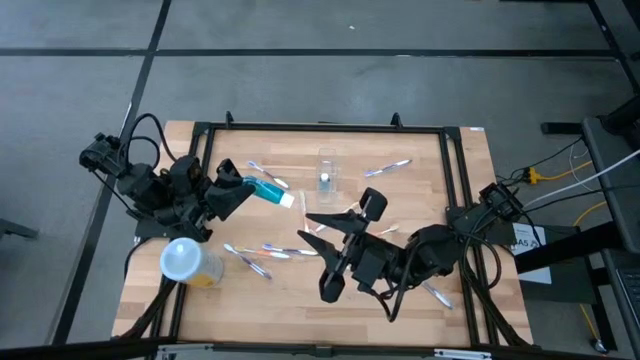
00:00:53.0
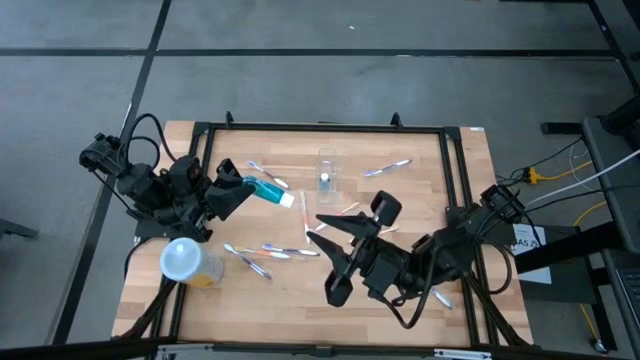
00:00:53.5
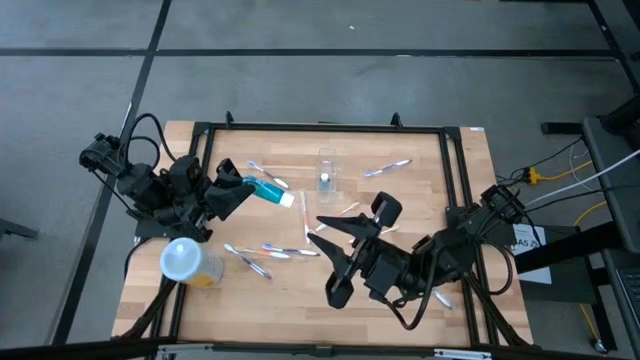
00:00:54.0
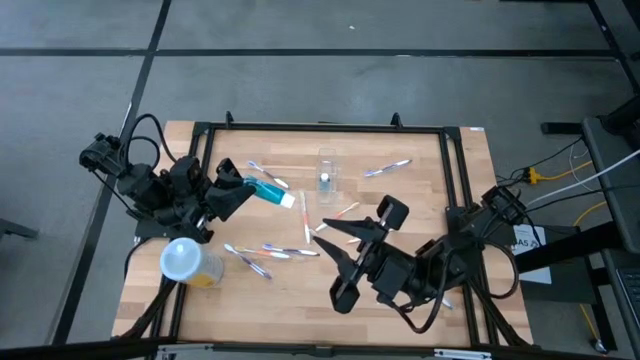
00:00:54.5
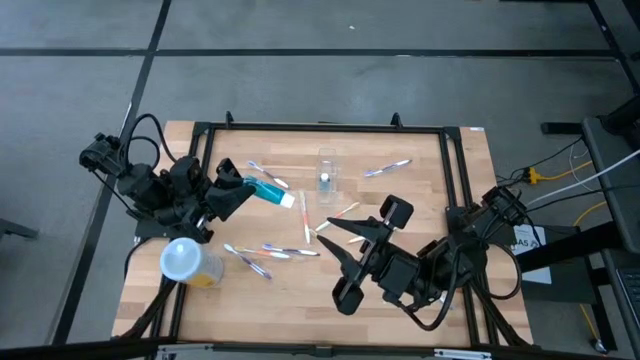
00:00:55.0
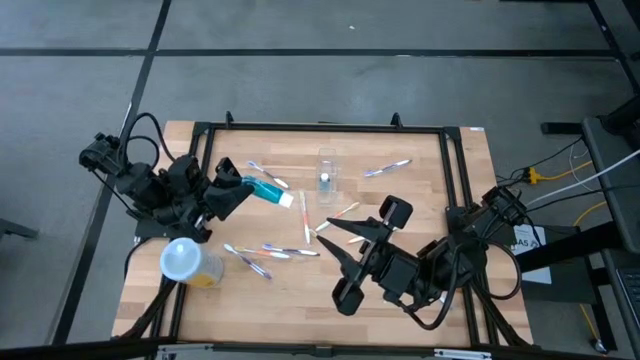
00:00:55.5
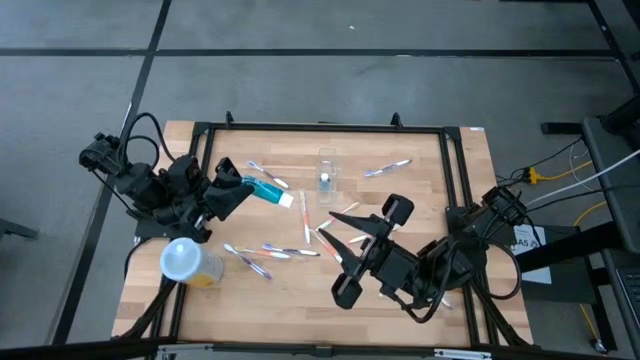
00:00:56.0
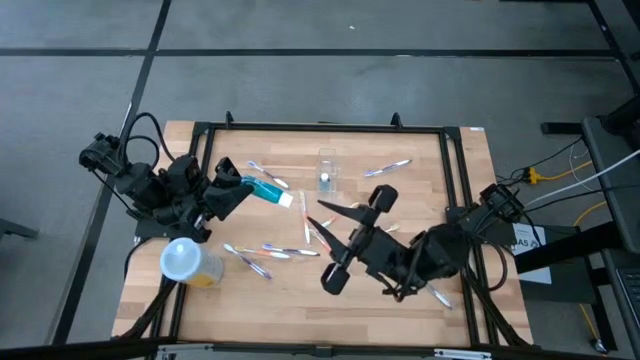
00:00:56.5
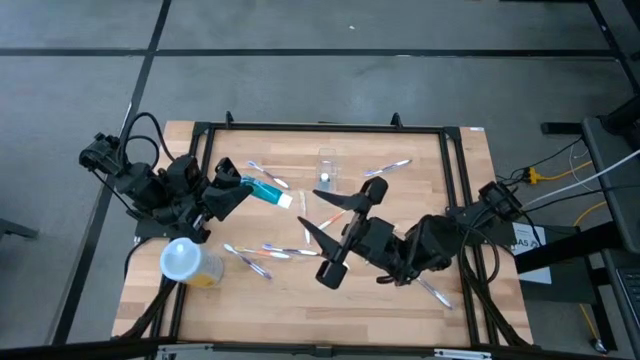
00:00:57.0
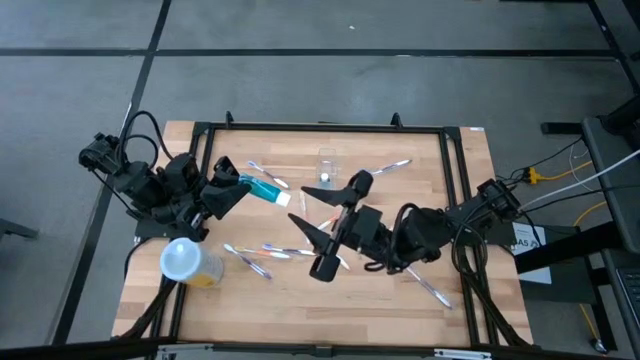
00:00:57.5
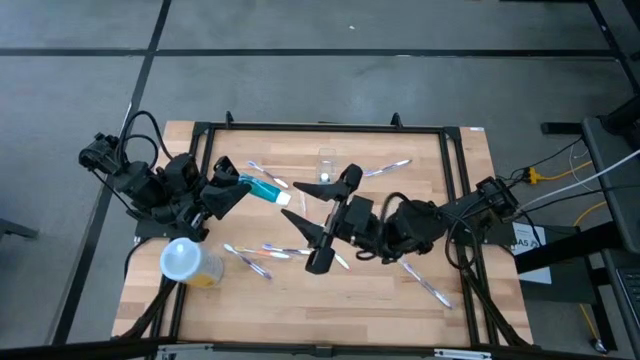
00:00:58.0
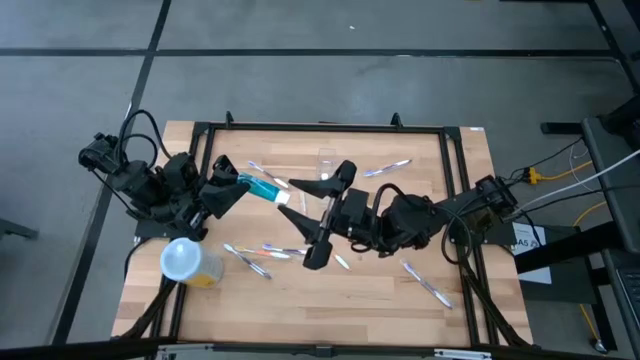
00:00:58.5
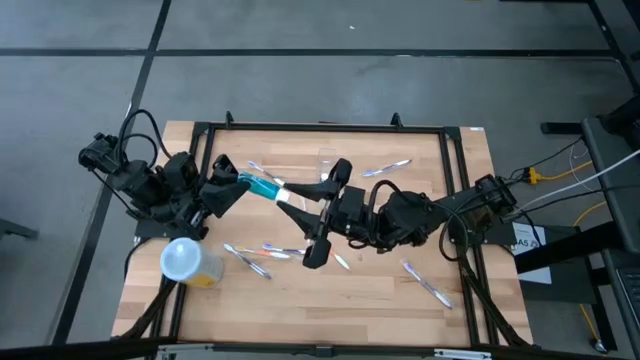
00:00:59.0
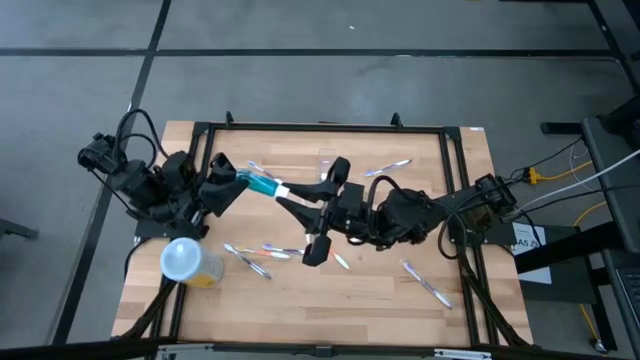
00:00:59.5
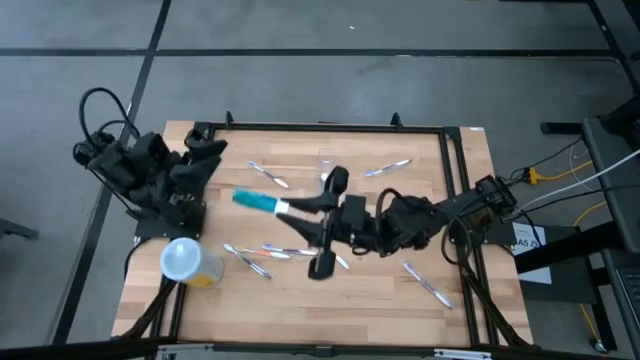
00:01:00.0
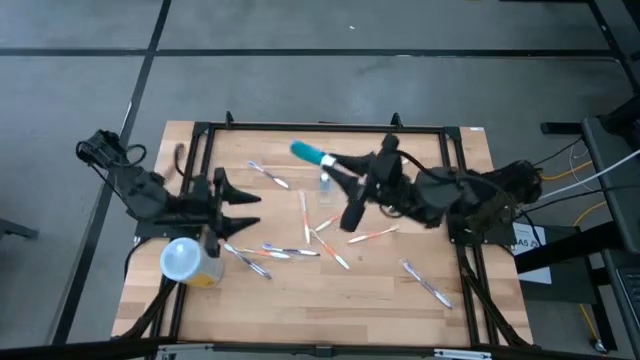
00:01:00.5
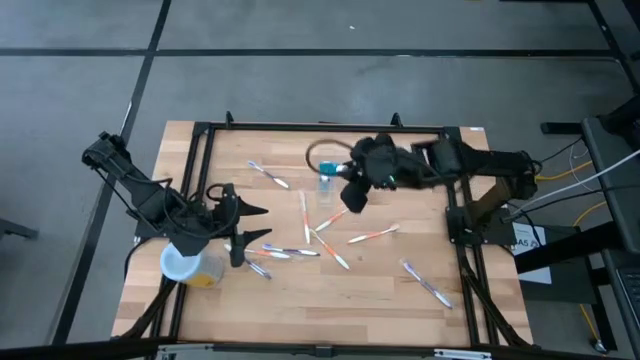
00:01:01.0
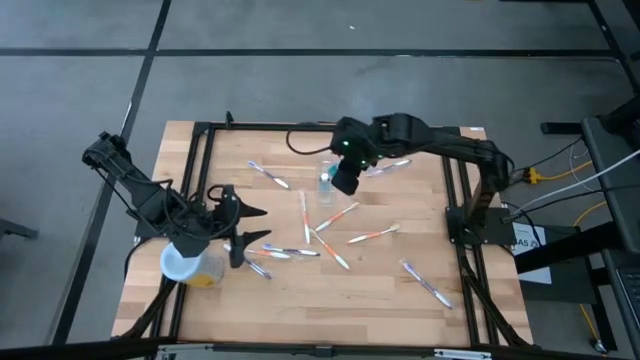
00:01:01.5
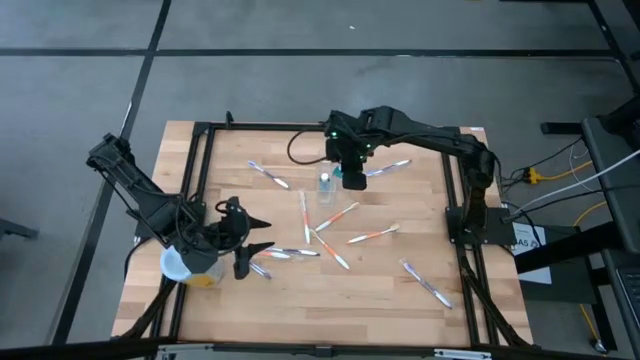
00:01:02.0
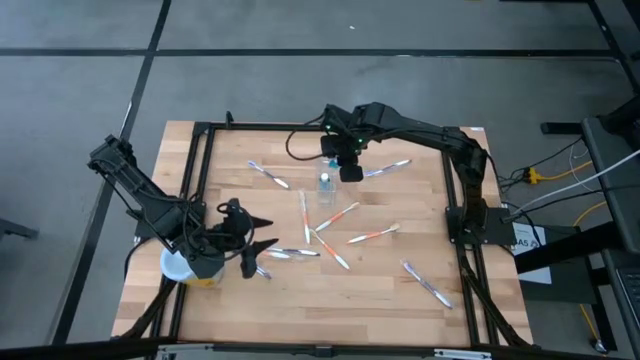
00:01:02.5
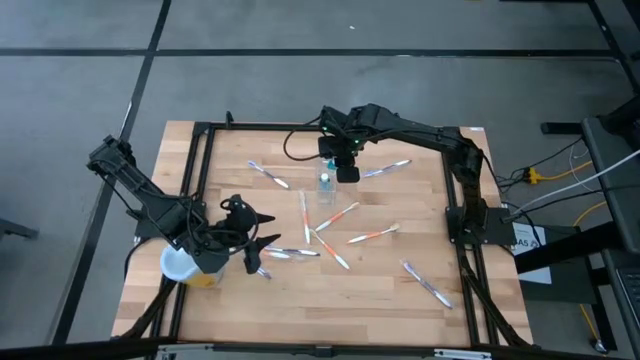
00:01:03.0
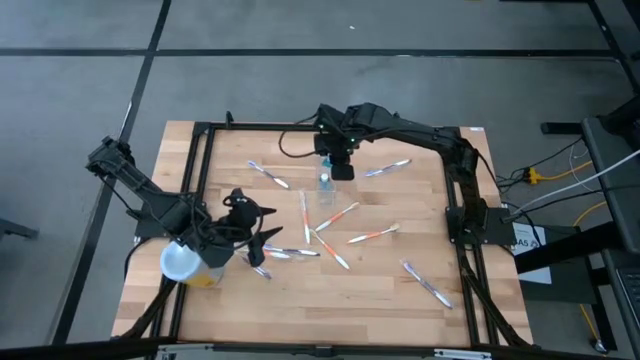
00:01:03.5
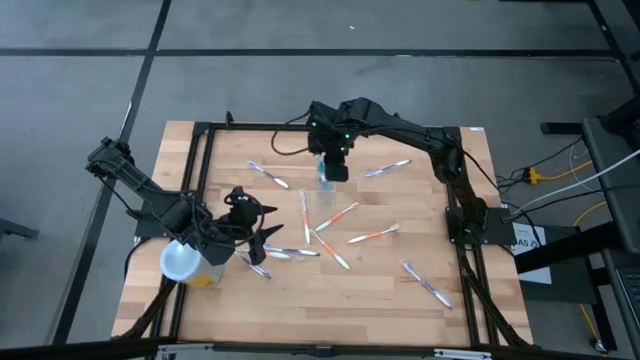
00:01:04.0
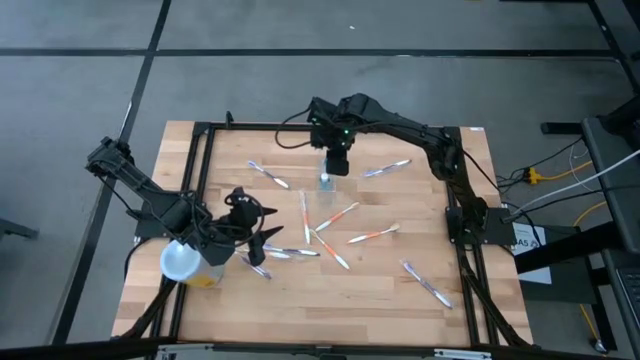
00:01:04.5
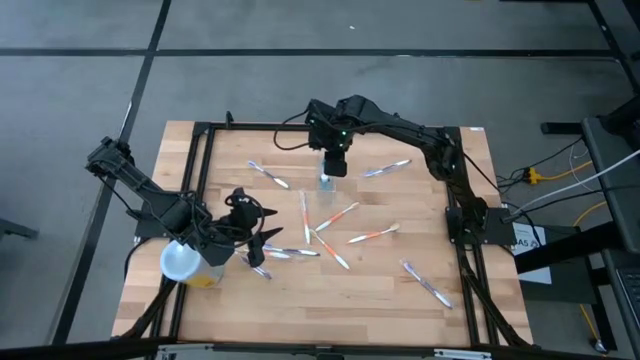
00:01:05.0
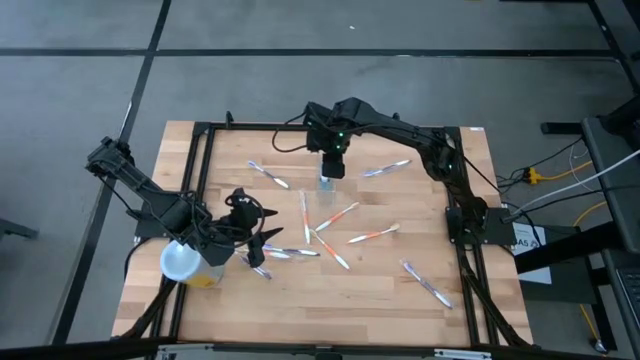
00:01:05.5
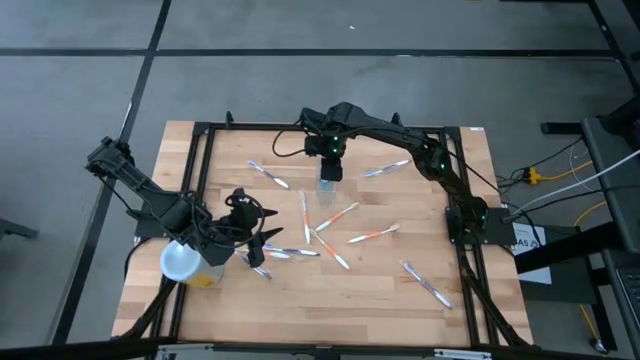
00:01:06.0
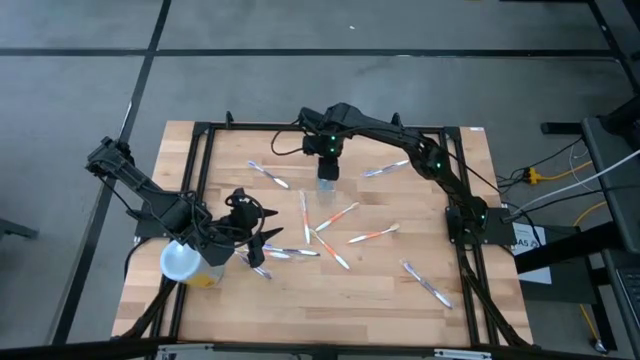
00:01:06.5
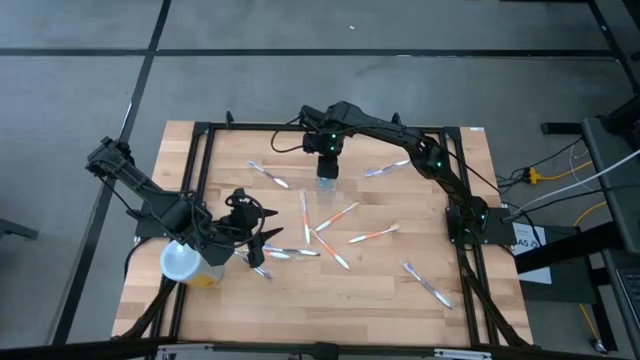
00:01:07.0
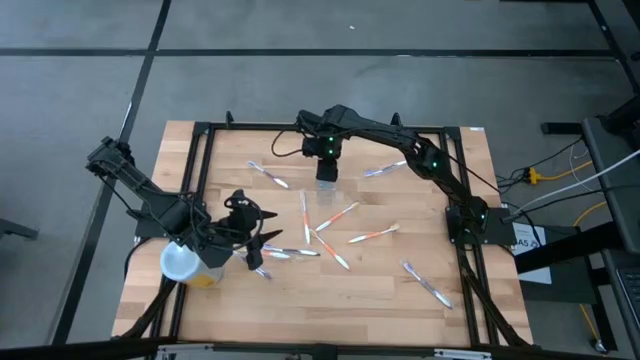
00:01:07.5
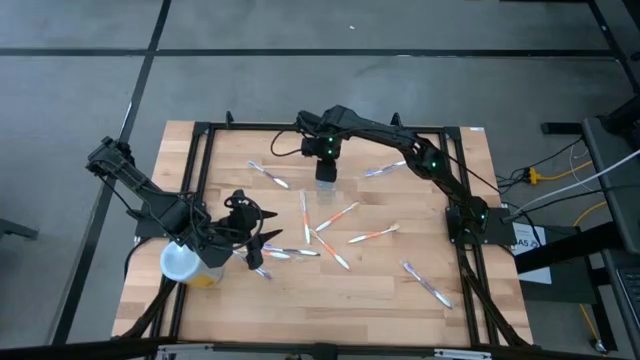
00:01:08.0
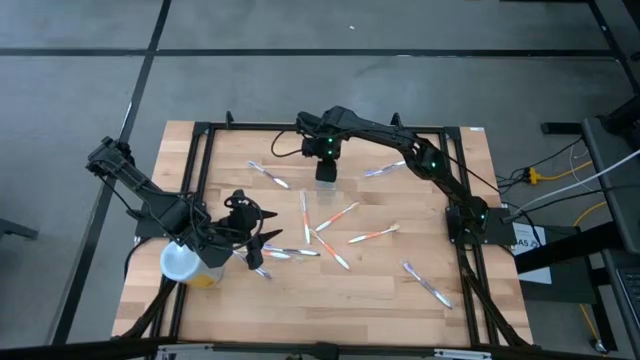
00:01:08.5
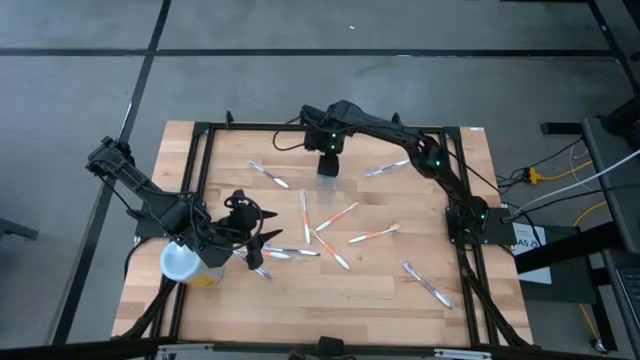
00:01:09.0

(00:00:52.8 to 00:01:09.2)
Task: Pick & Place toothbrushing station
Put the blue mouthwash into the transparent organizer

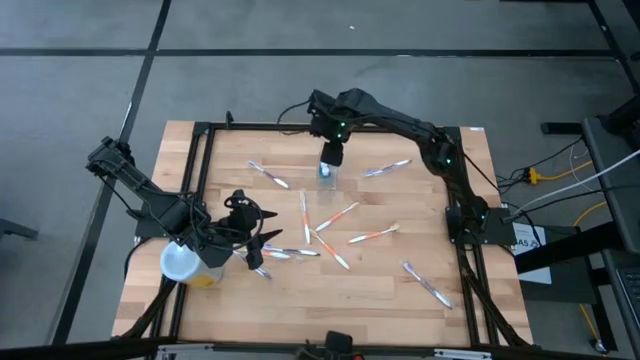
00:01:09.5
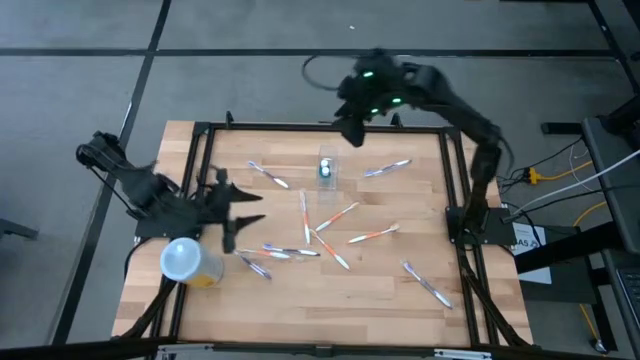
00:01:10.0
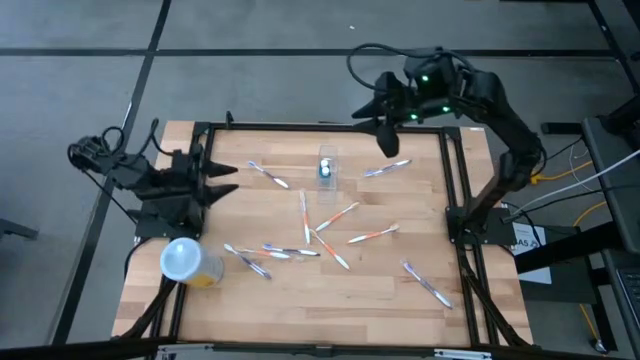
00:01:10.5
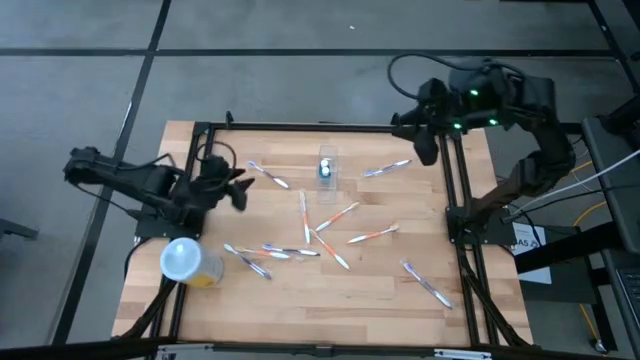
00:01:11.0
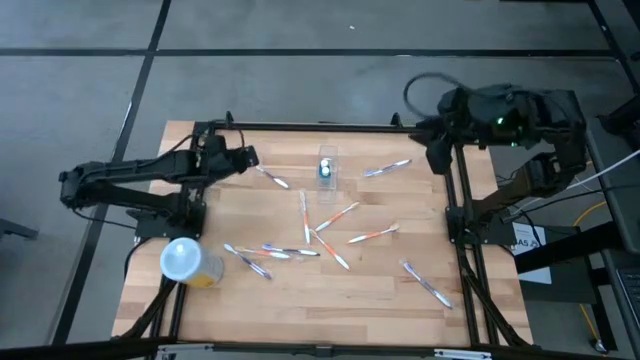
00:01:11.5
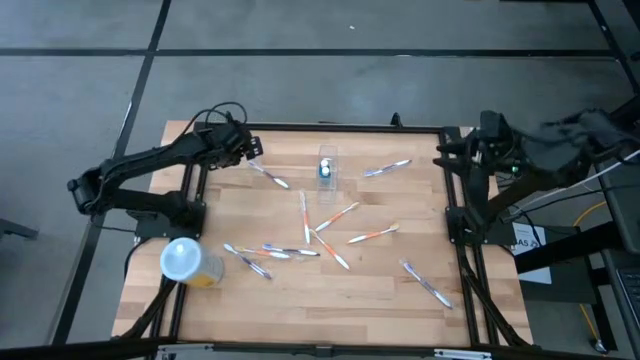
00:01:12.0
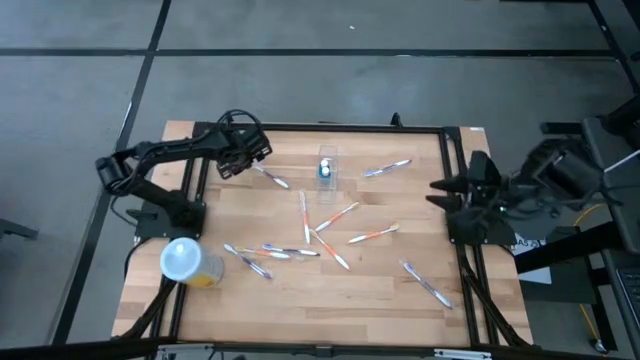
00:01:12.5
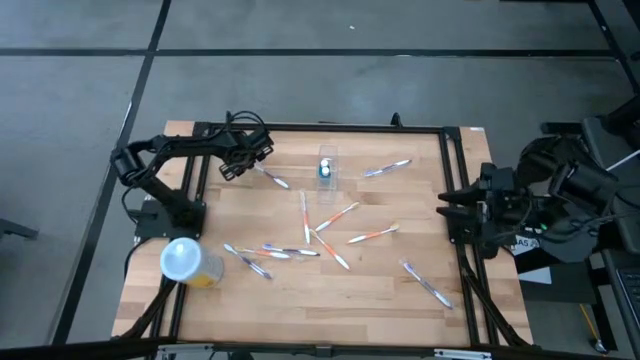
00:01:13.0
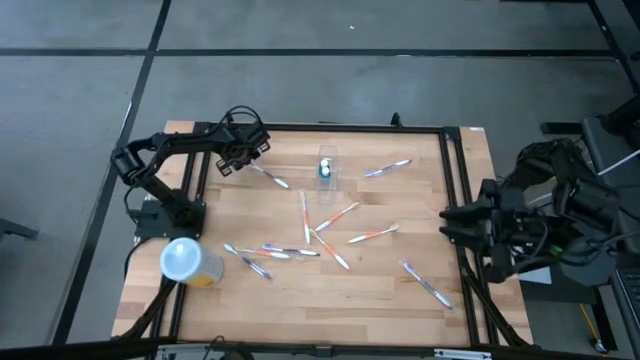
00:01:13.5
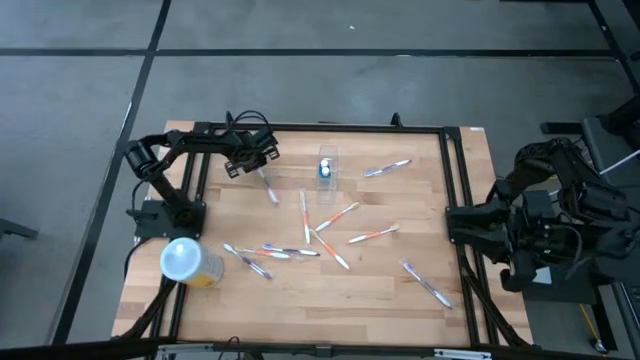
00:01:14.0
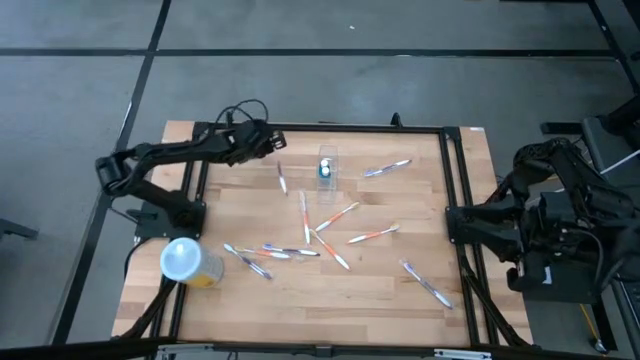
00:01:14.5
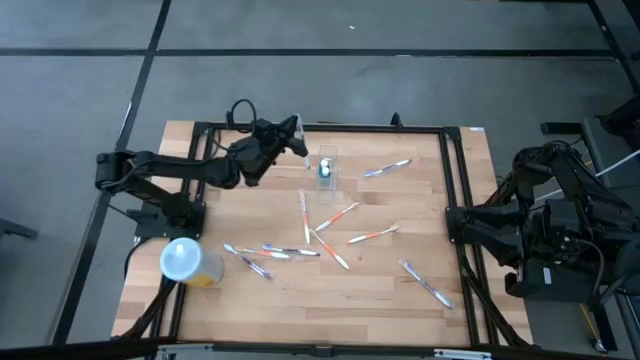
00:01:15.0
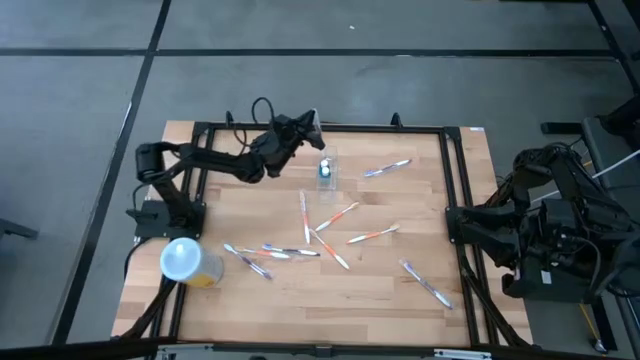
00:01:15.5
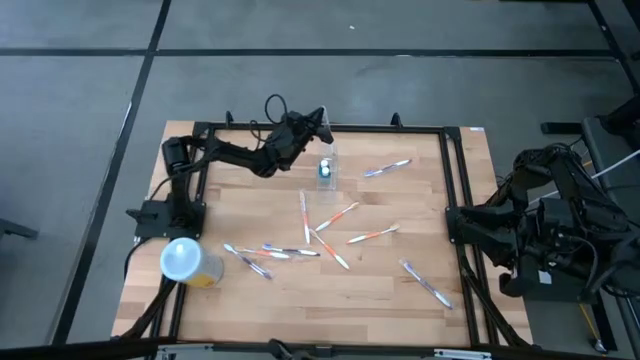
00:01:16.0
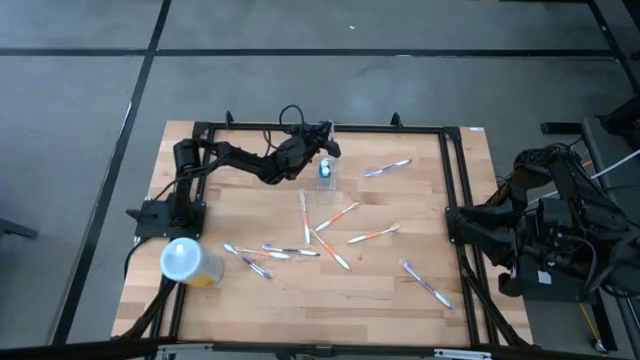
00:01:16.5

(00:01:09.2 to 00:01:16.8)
Put the purple toothbrush into the transparent organizer
